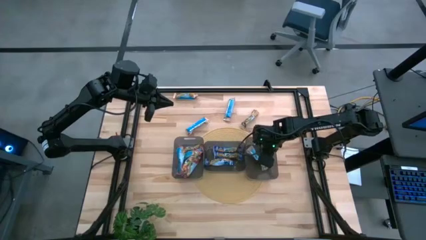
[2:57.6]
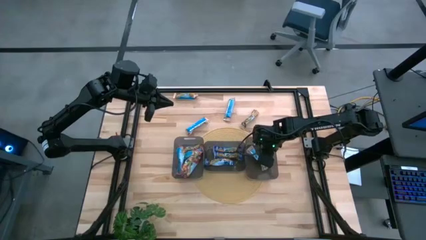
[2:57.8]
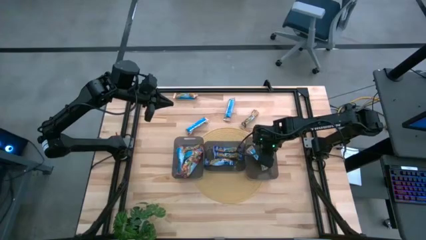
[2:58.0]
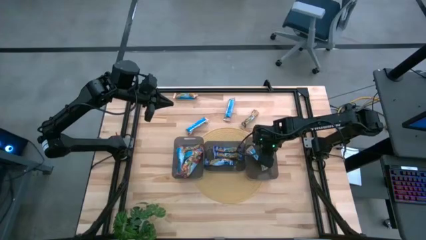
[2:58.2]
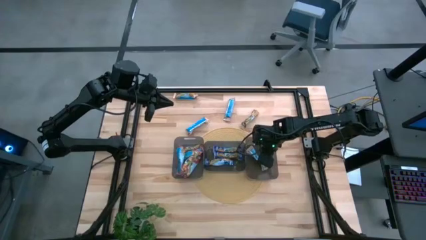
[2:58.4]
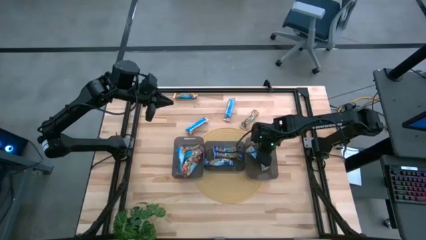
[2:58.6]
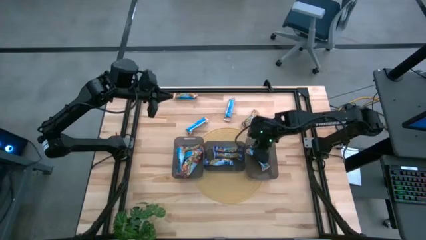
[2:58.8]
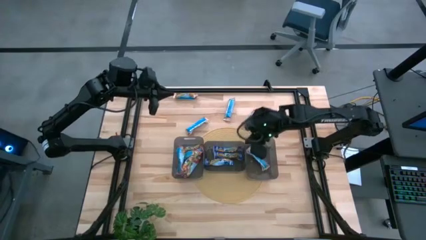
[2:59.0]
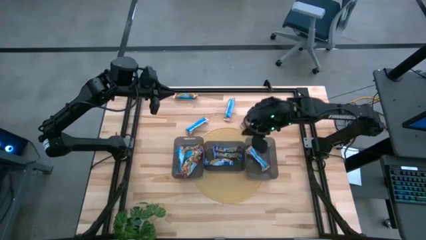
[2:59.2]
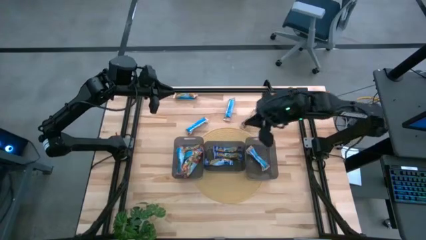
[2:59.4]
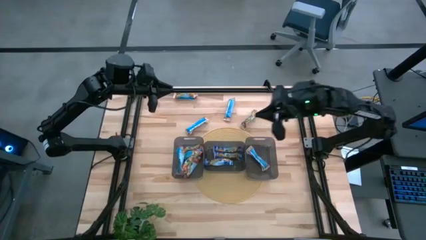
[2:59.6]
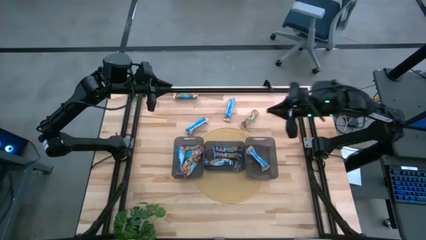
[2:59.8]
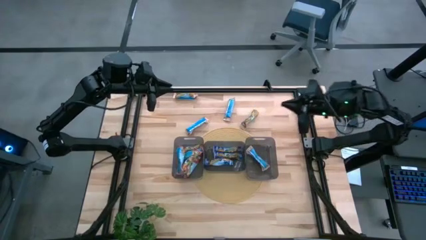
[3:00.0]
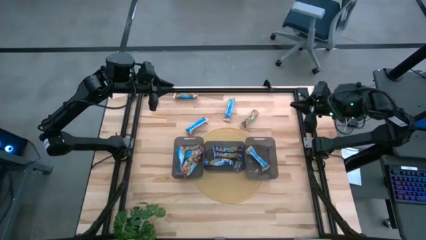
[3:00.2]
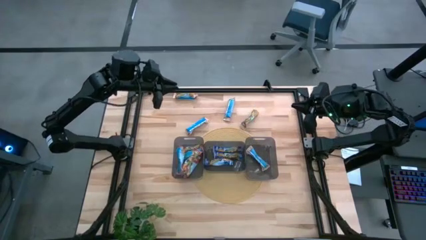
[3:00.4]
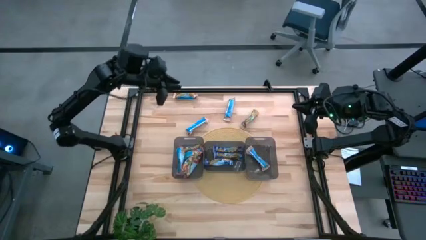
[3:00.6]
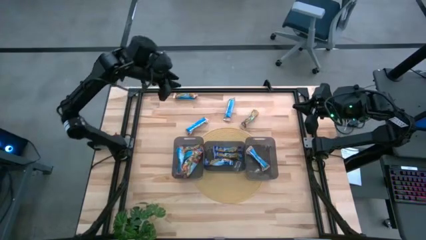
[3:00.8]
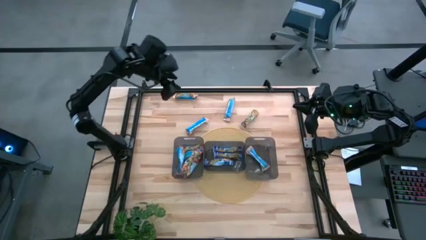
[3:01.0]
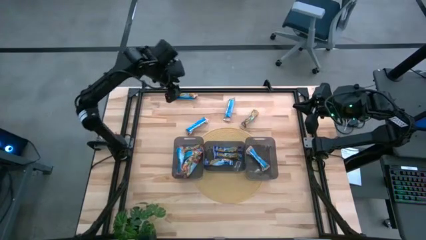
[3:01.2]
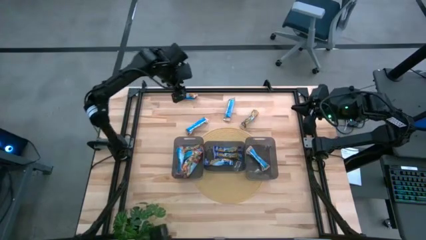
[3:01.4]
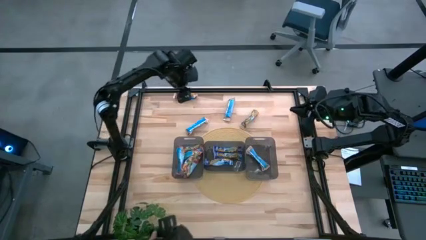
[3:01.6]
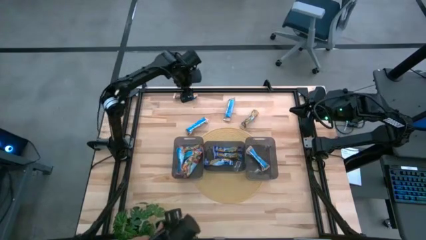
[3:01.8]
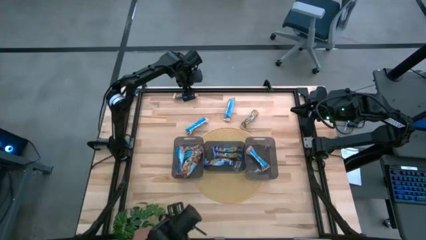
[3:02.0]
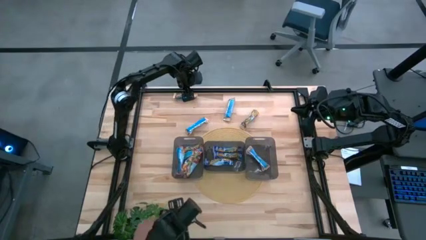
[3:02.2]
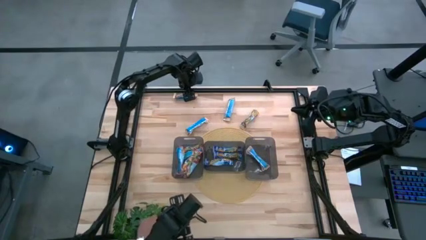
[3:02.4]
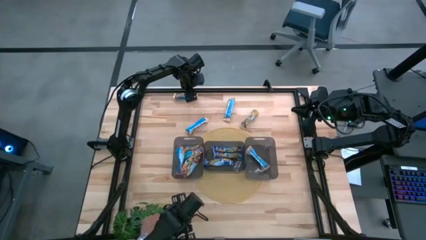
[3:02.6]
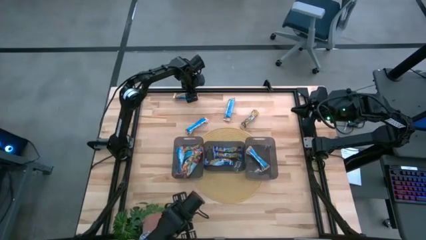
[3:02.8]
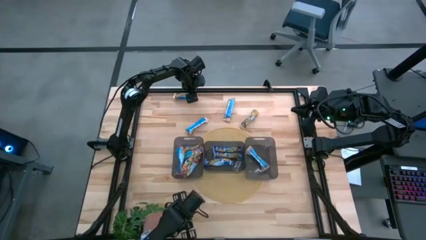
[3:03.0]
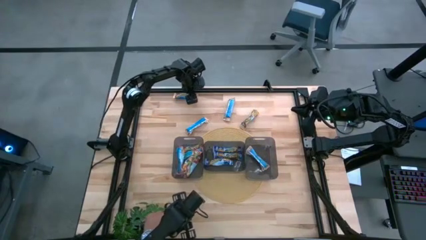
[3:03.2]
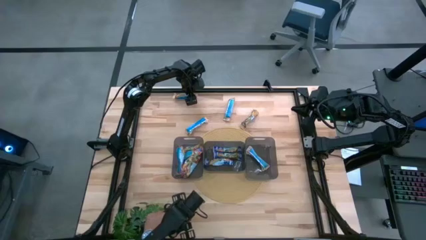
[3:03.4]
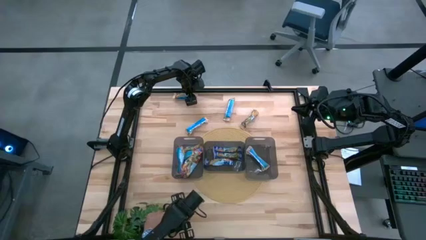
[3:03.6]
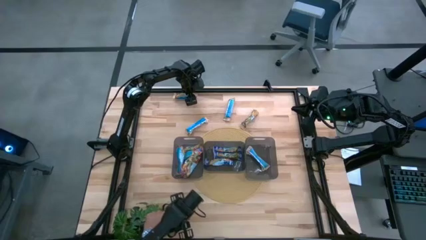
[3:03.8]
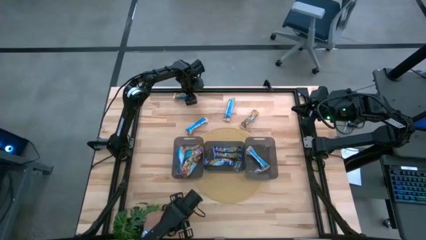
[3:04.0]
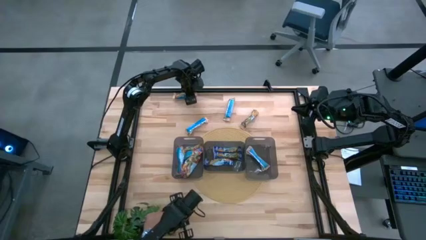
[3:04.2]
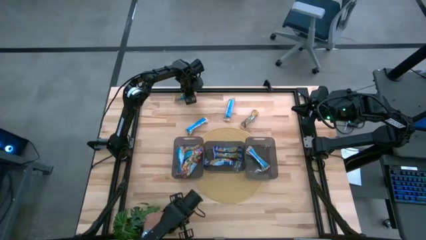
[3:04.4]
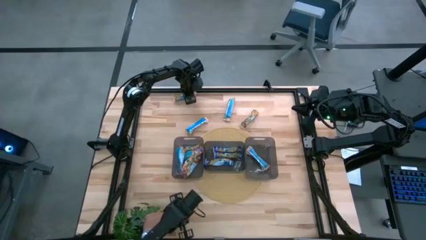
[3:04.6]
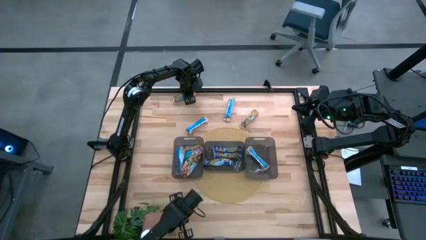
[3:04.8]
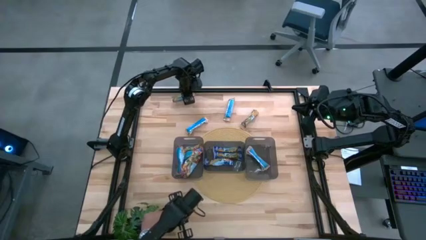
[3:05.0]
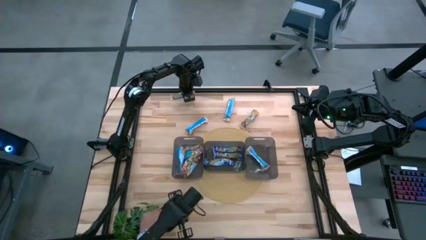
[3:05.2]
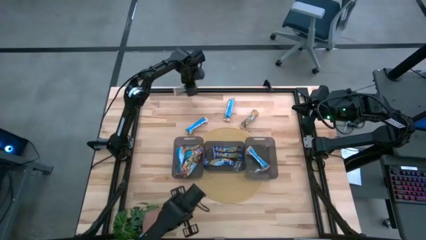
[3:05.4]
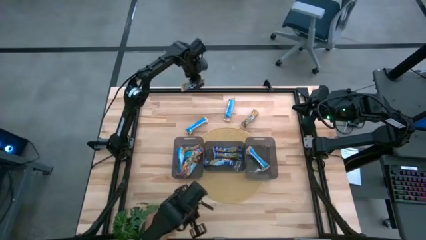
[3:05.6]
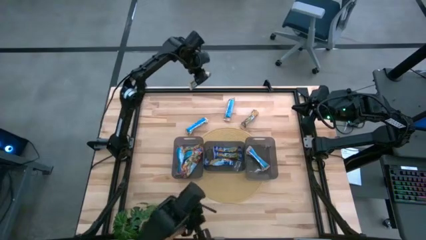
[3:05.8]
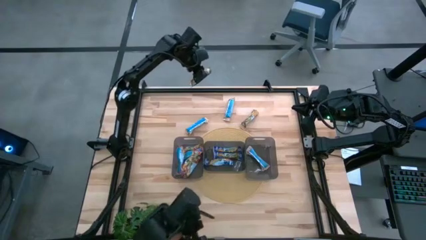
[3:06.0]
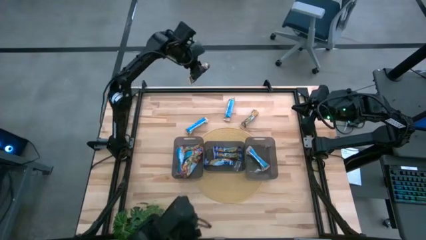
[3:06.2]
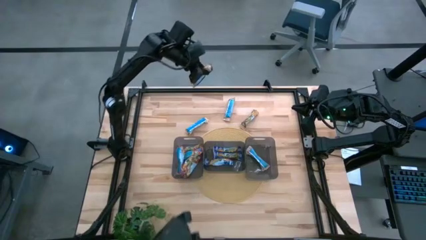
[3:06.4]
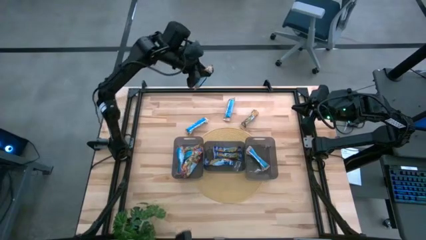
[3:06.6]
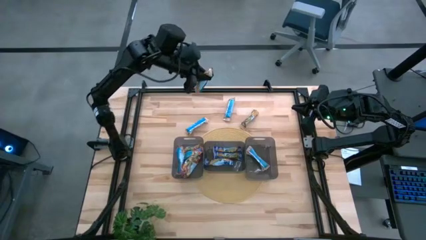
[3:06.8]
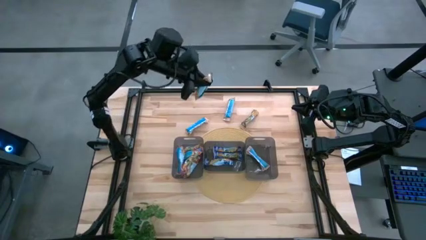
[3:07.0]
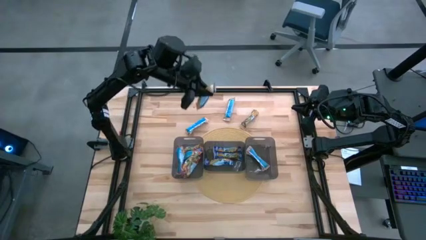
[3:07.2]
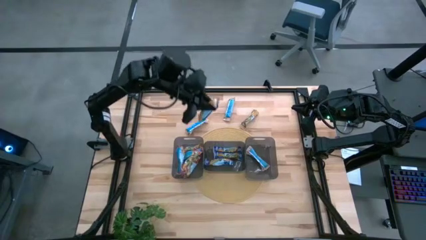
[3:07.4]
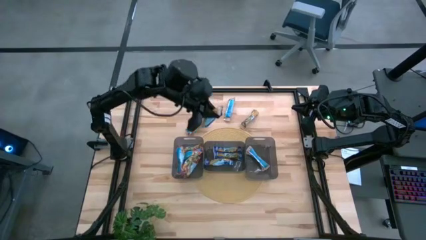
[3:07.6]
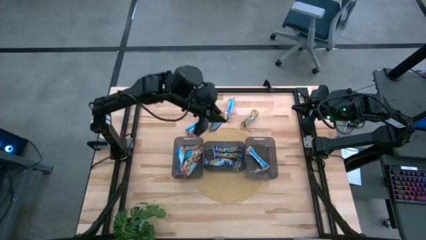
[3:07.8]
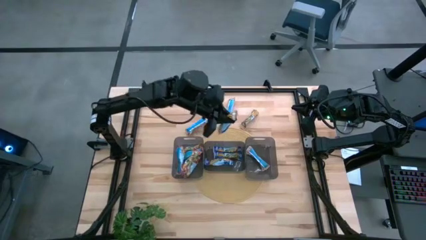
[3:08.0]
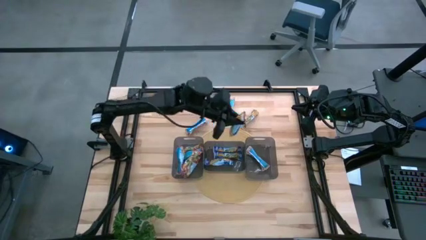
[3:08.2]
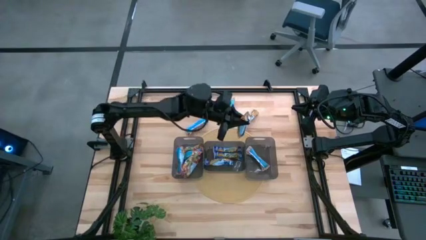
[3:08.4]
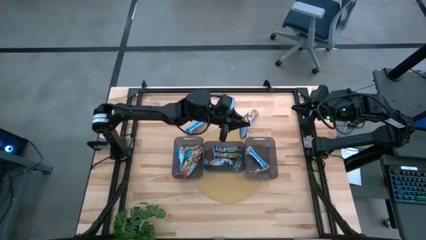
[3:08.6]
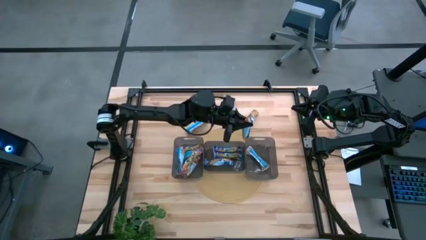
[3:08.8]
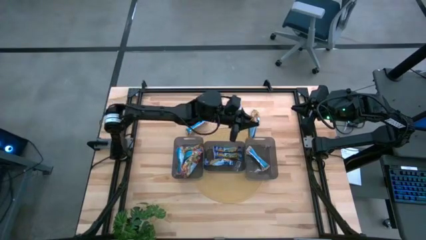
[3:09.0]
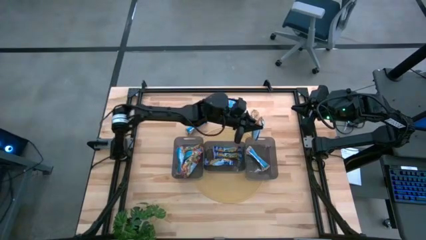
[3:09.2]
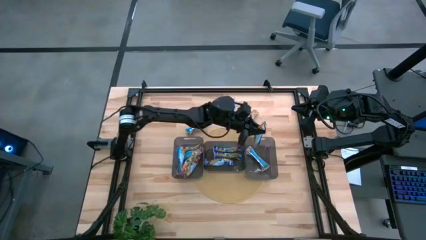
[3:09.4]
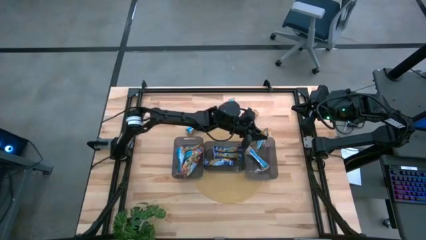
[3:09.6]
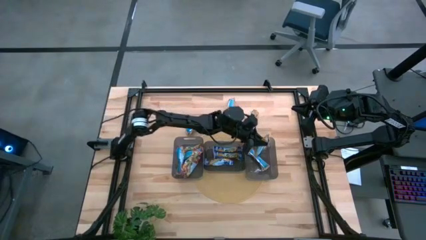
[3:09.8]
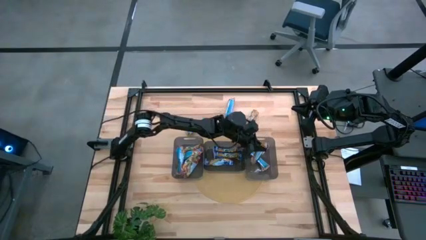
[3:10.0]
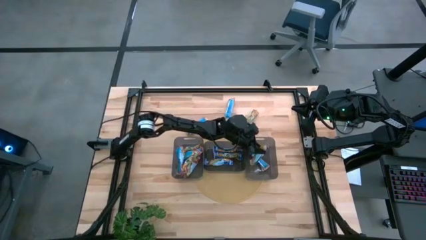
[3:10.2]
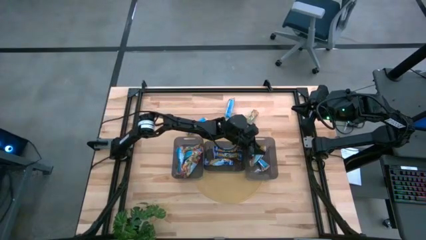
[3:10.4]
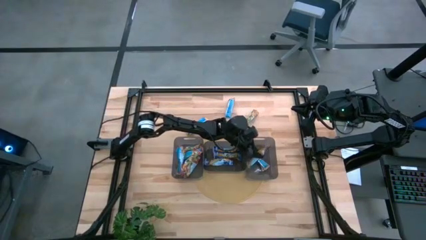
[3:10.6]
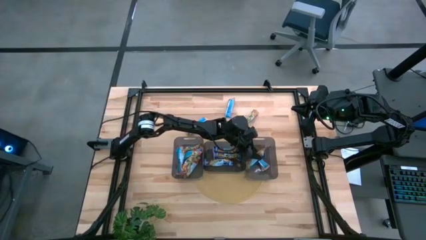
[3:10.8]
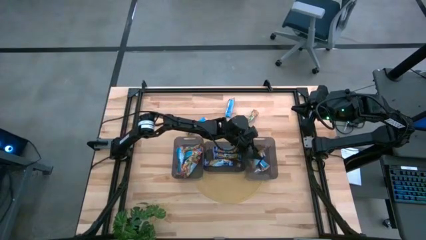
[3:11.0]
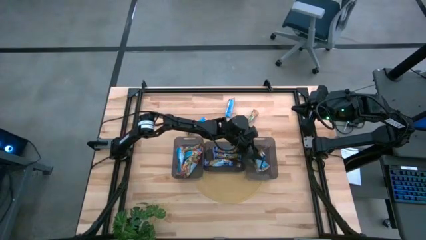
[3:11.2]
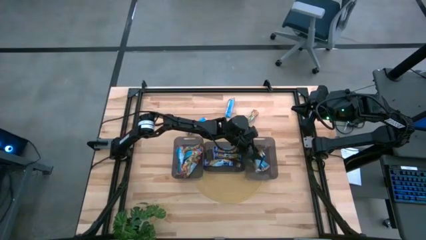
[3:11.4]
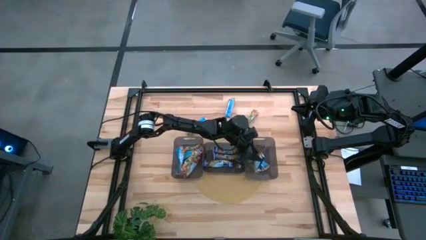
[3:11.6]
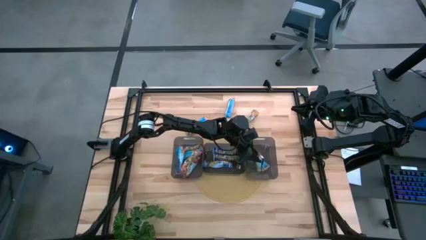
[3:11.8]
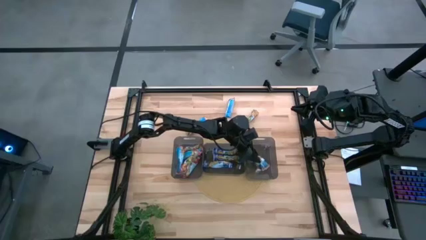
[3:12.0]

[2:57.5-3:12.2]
Task: Pick and place Granola Bars by type
Put the orange granola bar into the right black bin

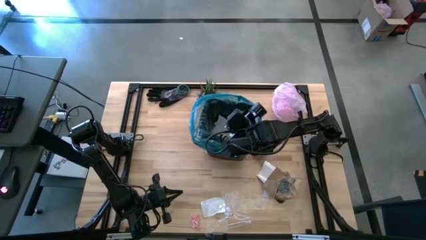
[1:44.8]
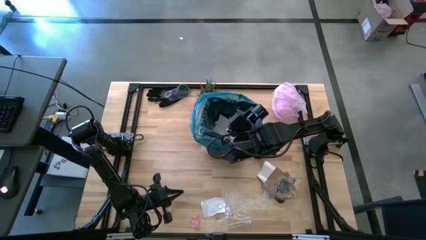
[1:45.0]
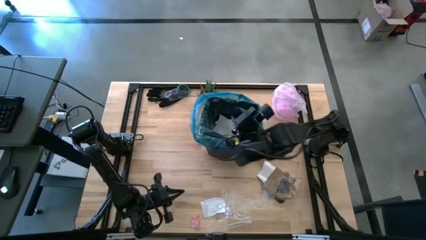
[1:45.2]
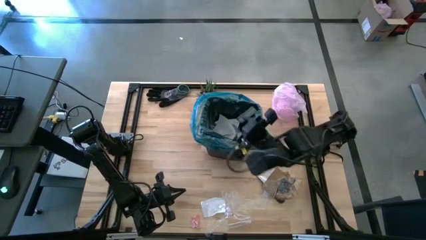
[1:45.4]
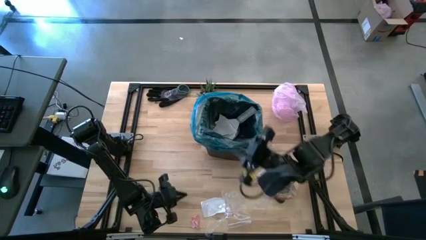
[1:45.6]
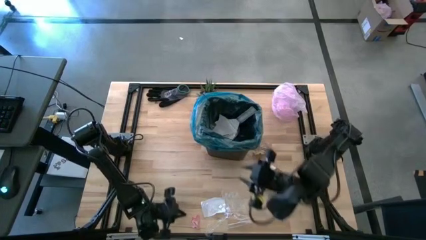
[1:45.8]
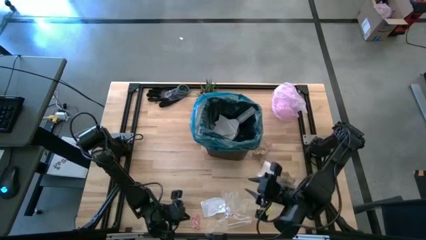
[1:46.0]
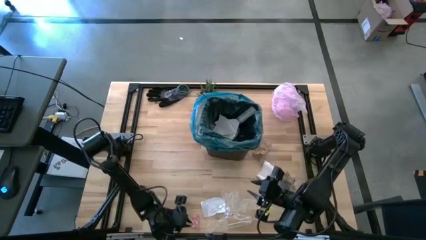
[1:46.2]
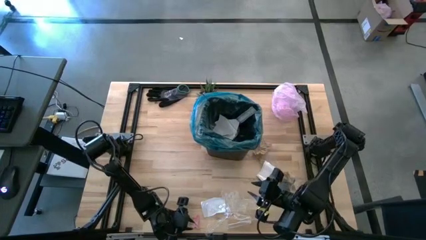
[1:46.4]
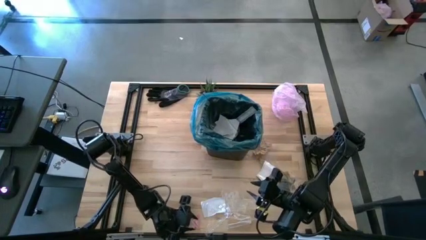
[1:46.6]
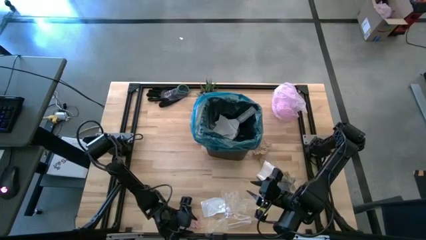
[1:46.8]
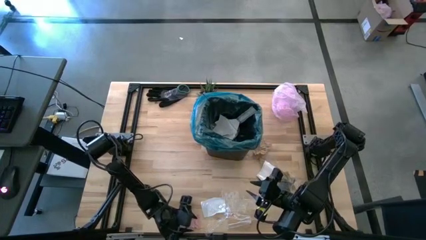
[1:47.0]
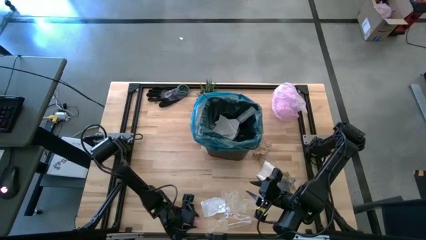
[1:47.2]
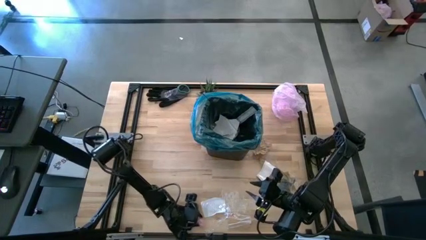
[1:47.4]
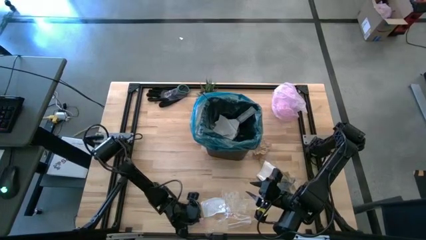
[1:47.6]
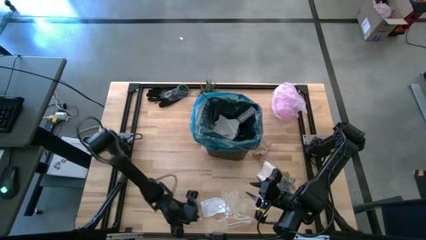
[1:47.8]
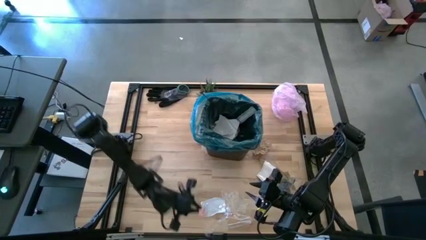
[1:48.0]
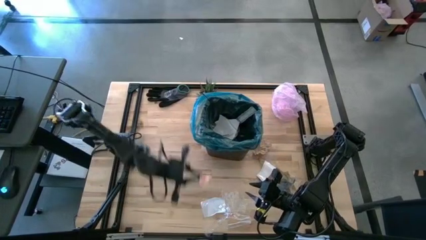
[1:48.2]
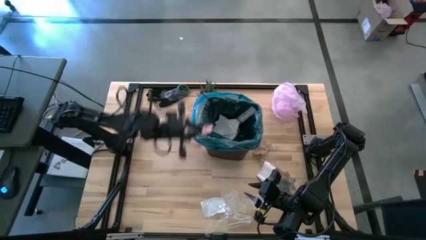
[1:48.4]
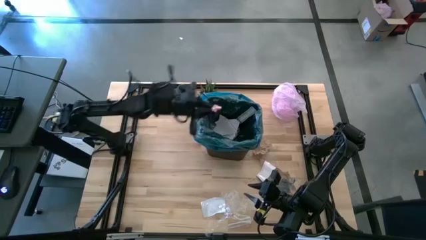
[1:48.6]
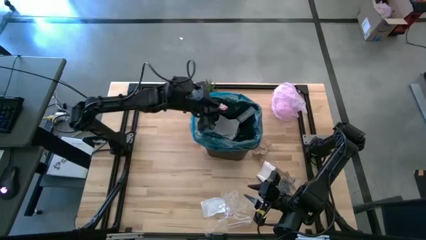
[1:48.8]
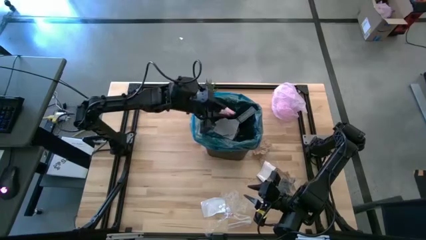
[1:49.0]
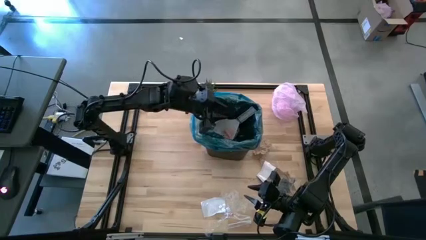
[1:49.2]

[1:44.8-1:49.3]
Task: place trash/remove bag and relplace
Put the pink paper into the trash bin
